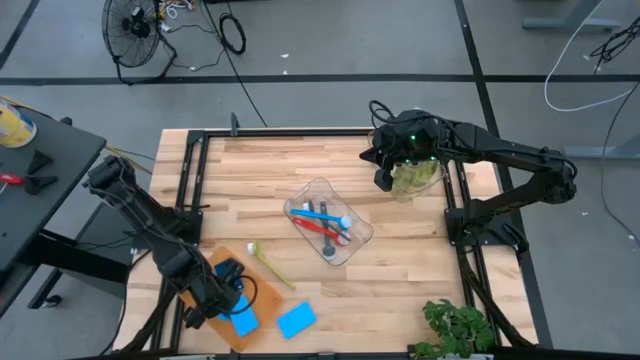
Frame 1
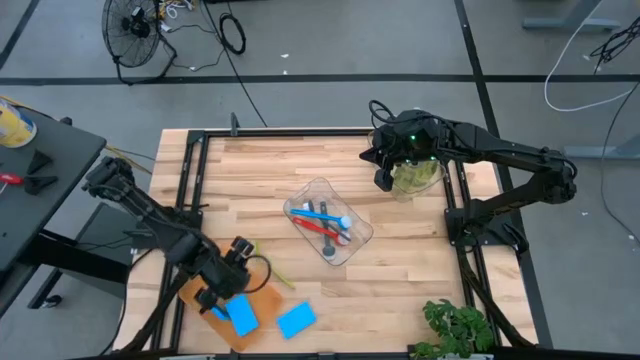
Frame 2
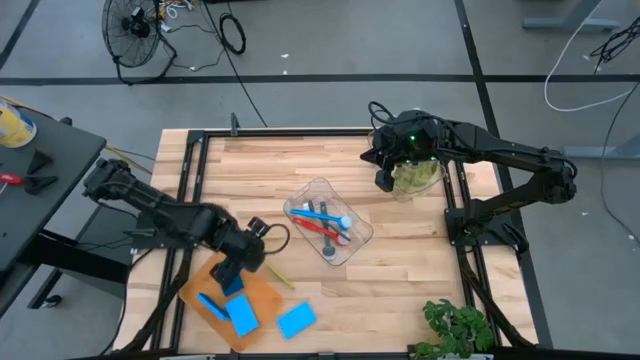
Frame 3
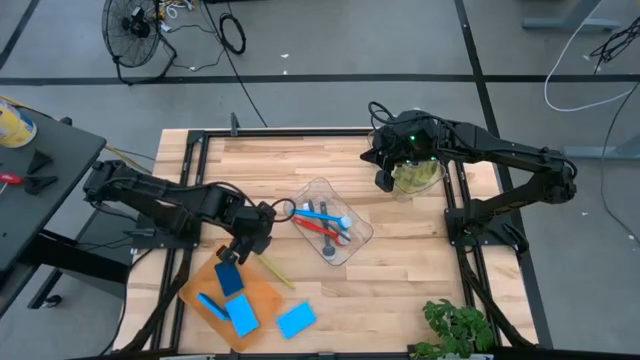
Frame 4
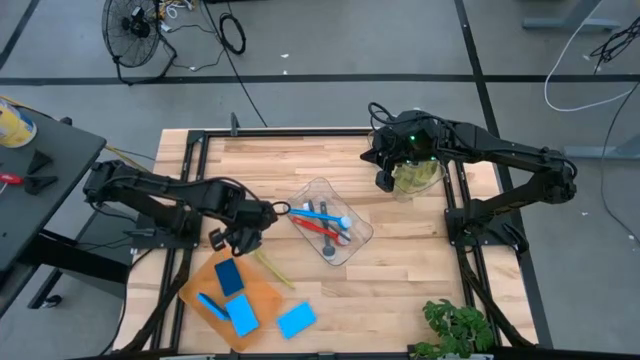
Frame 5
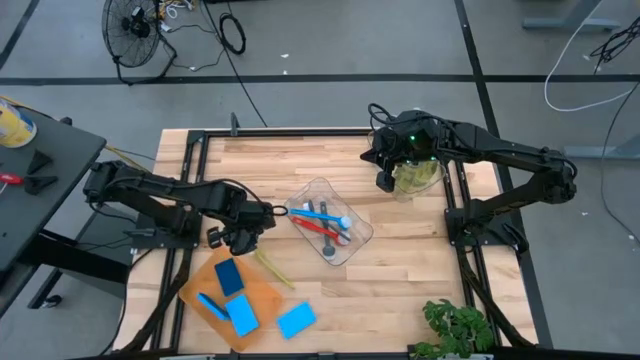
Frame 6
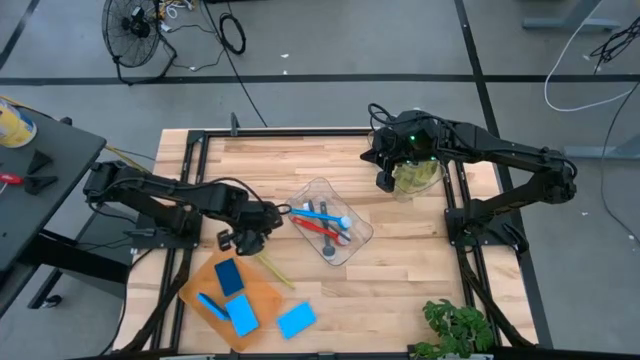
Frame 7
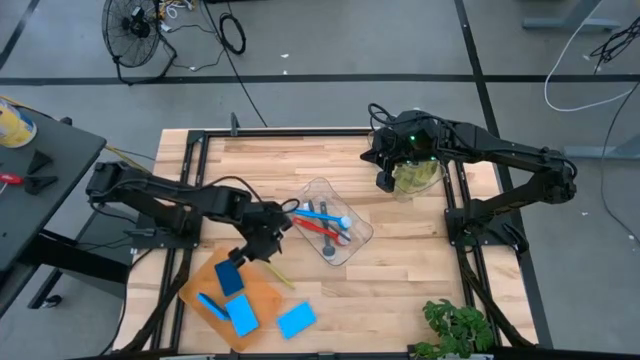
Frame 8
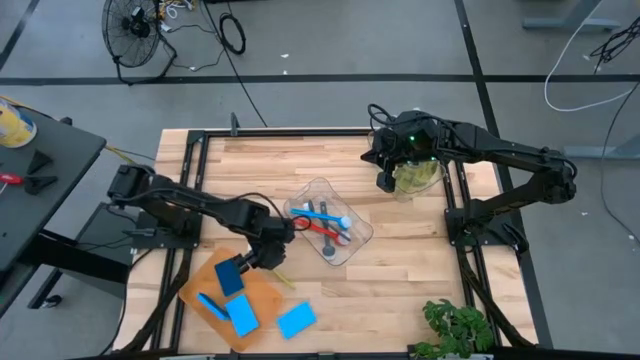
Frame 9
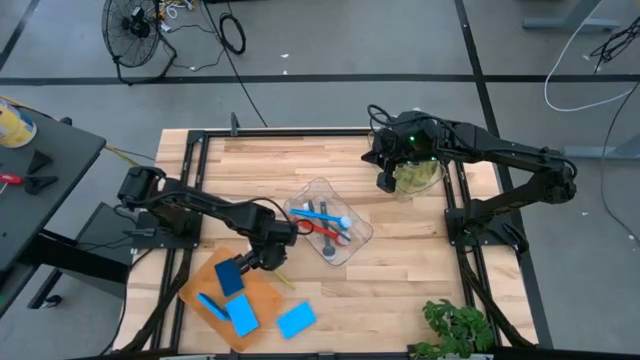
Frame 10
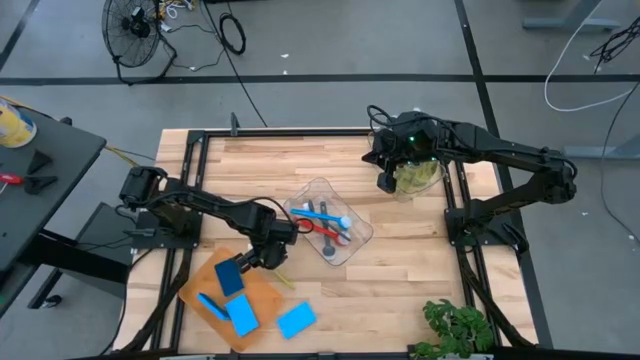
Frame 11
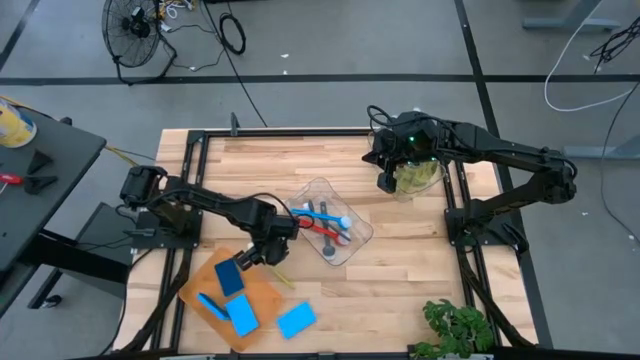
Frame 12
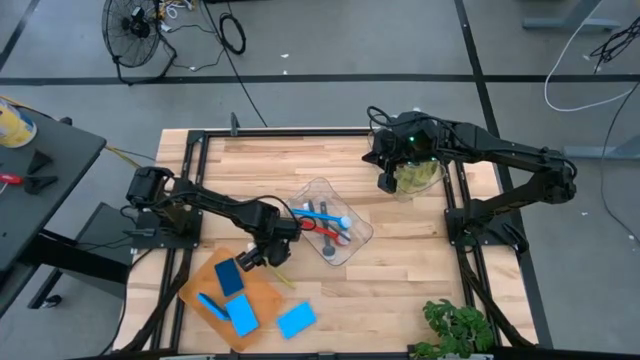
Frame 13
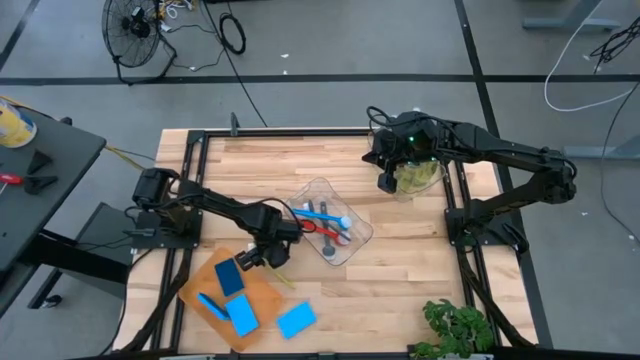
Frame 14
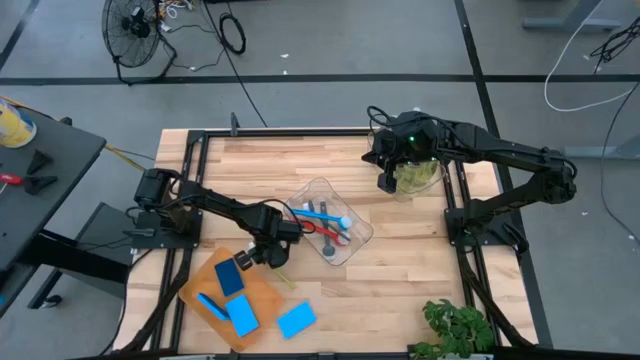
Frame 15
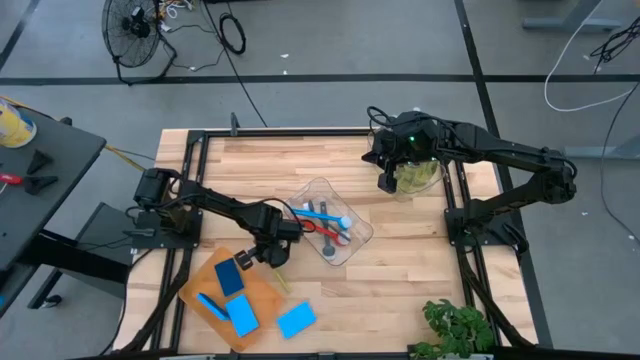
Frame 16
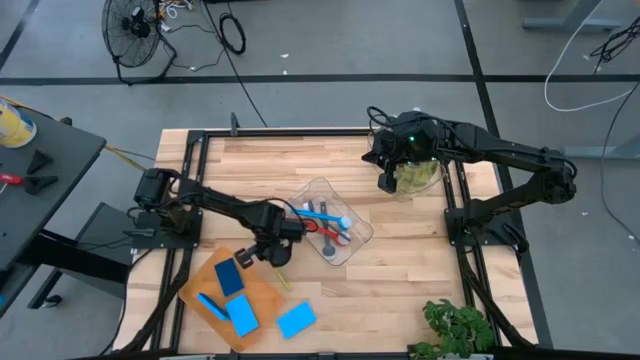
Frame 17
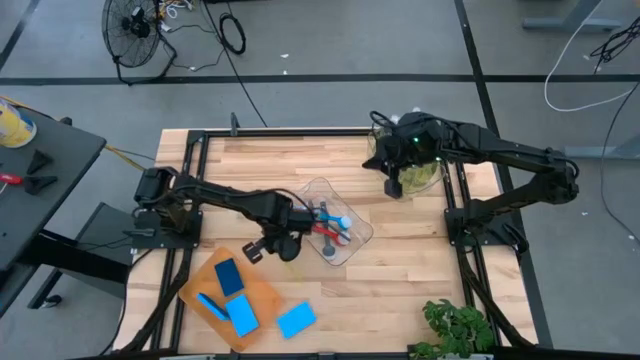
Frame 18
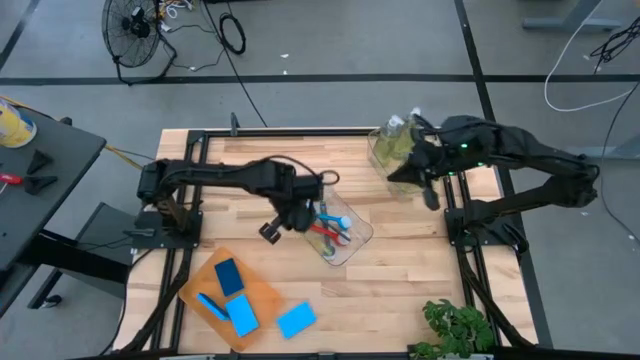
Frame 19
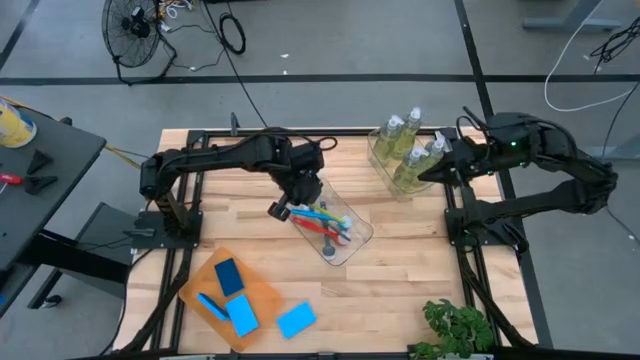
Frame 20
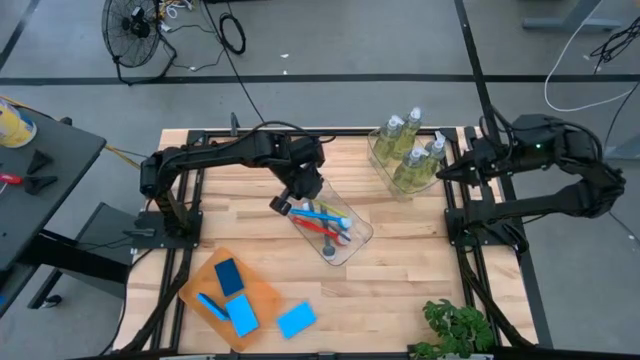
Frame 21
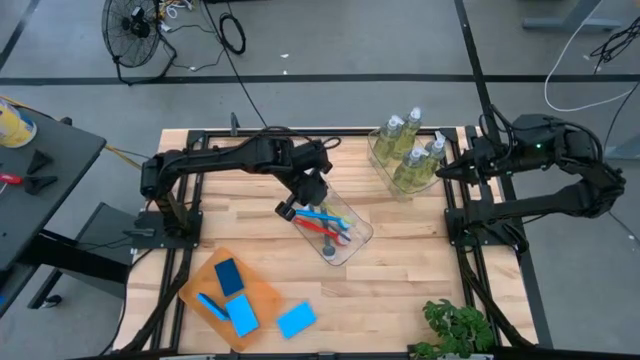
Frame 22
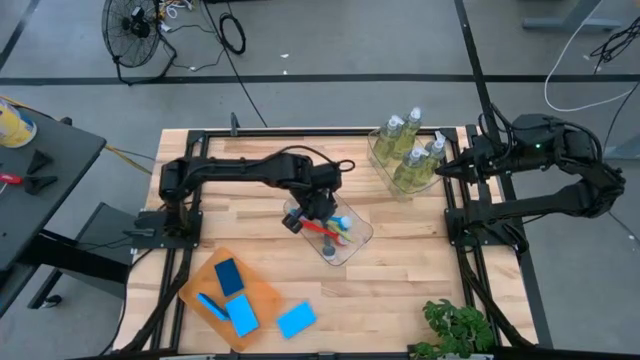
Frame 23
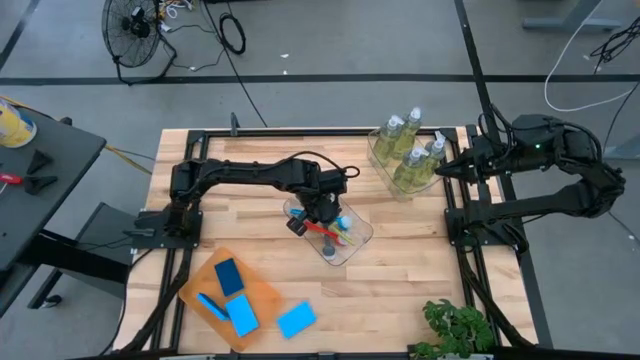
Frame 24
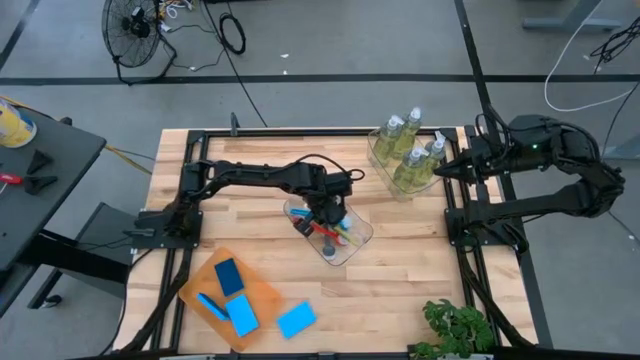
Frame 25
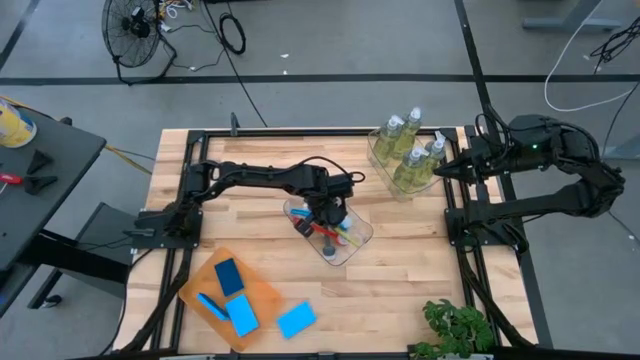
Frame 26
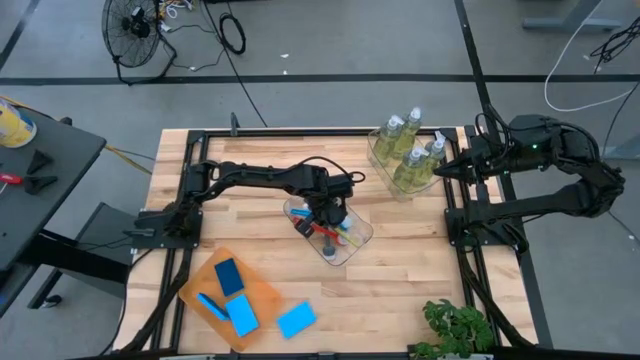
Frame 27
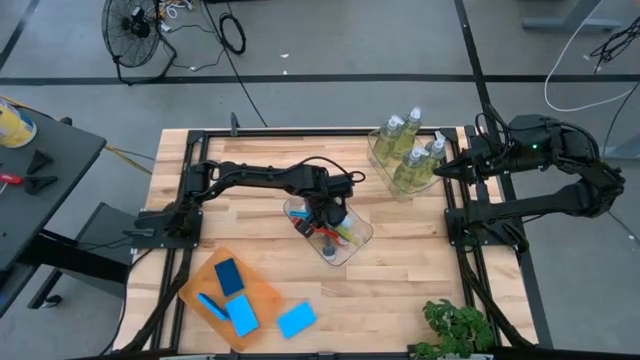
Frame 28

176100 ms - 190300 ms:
Task: Pick & Place Kitchen Sink Supplies
Put the green dish brush into the bottom transparent bin

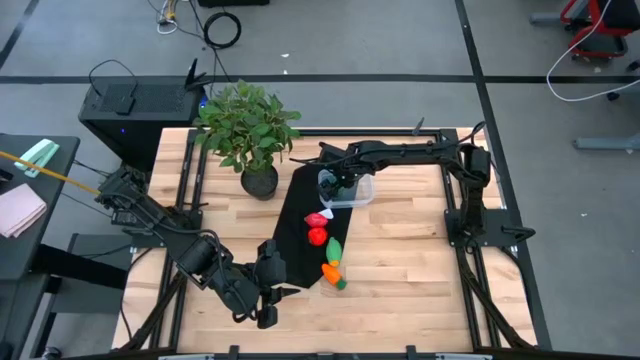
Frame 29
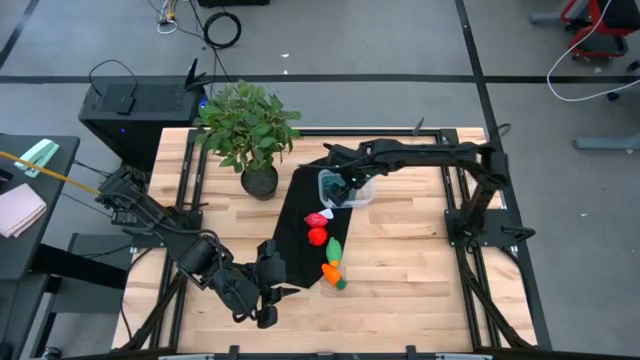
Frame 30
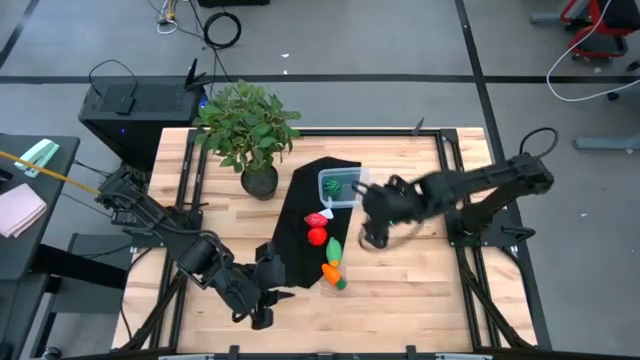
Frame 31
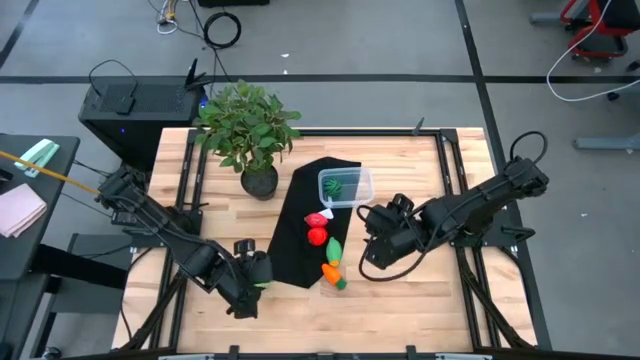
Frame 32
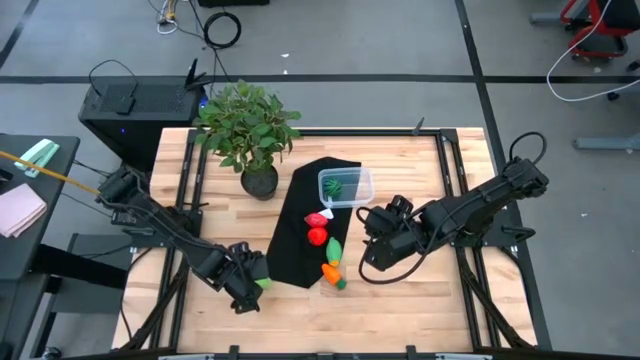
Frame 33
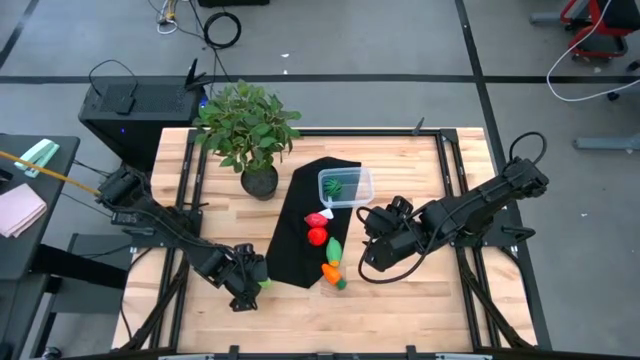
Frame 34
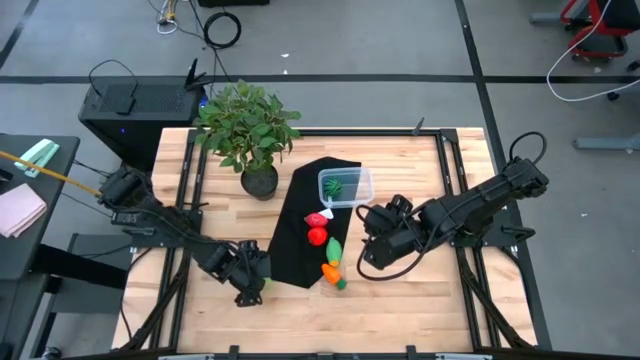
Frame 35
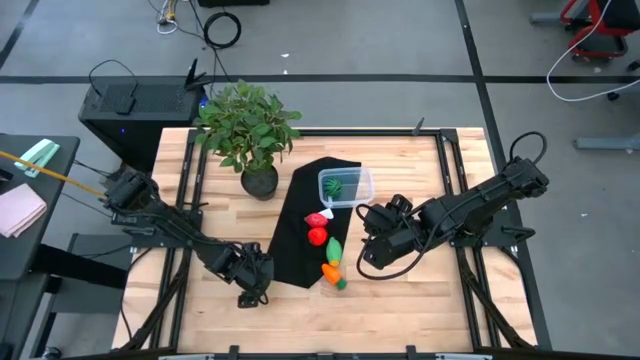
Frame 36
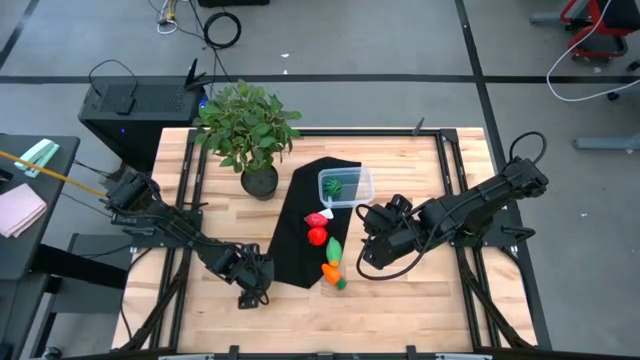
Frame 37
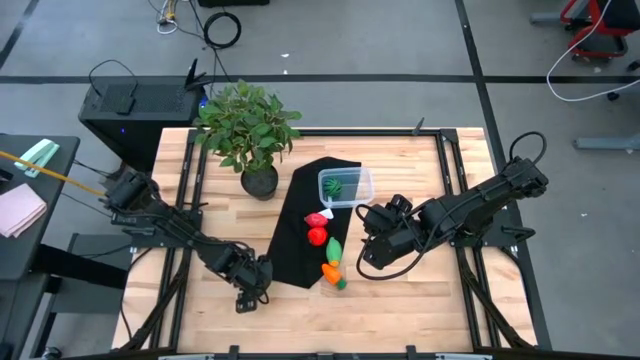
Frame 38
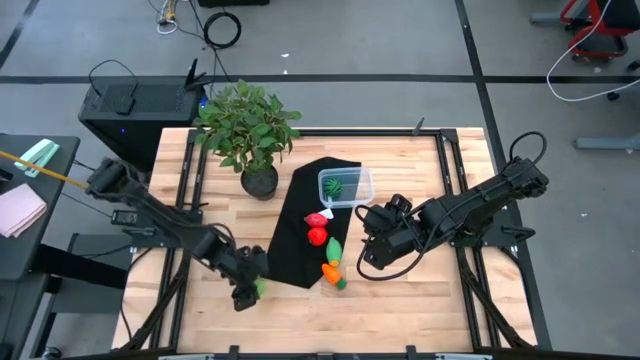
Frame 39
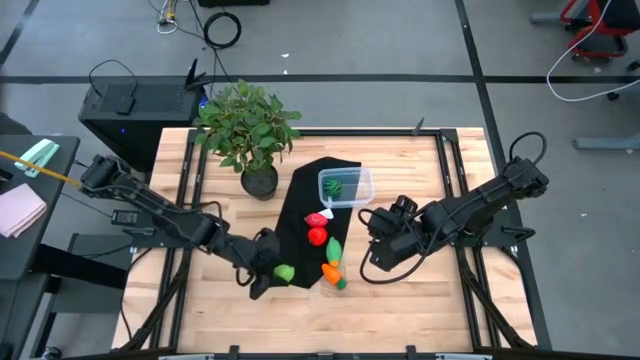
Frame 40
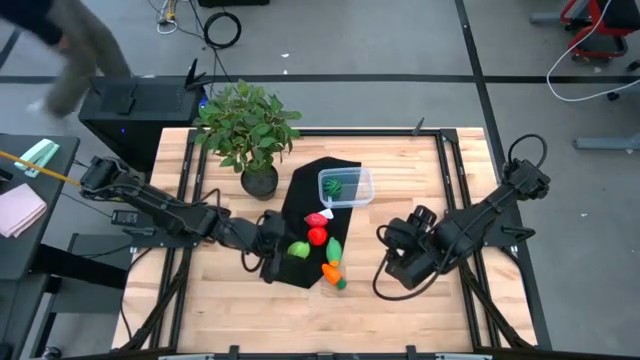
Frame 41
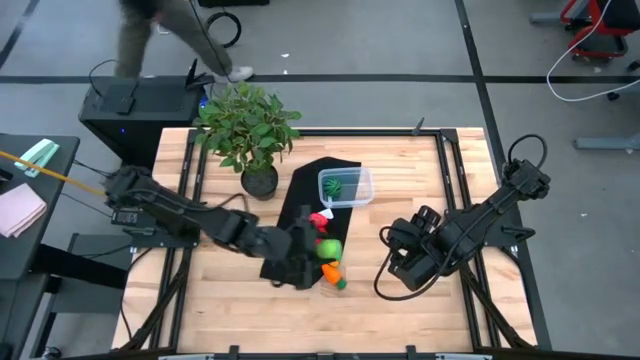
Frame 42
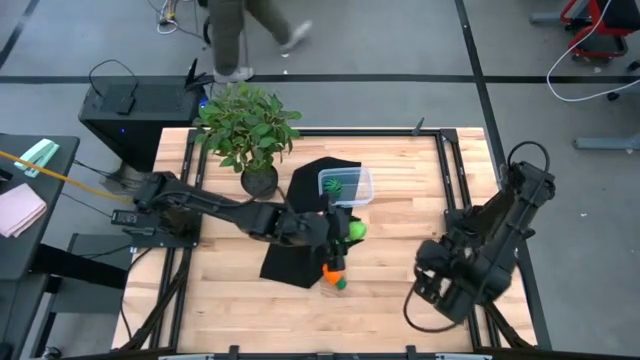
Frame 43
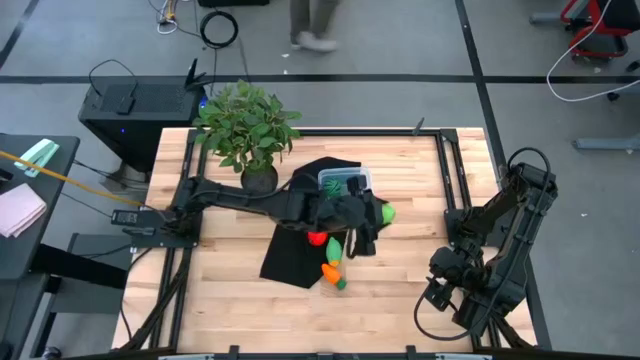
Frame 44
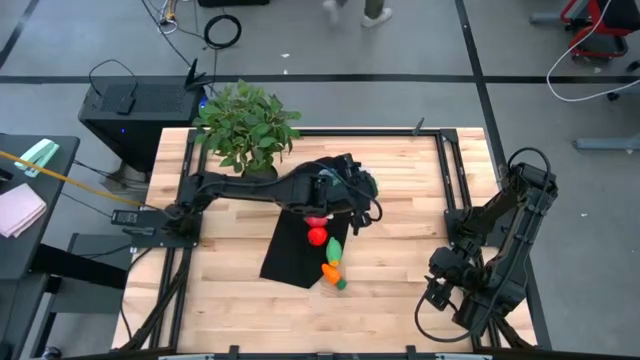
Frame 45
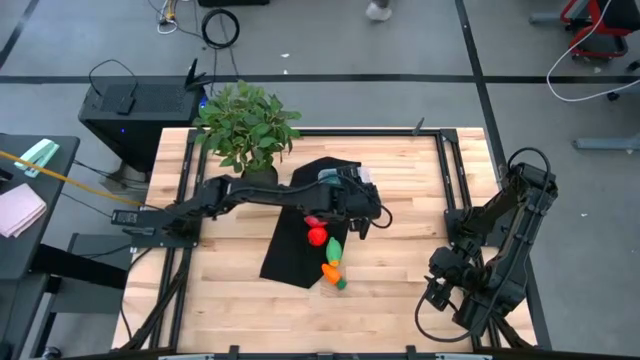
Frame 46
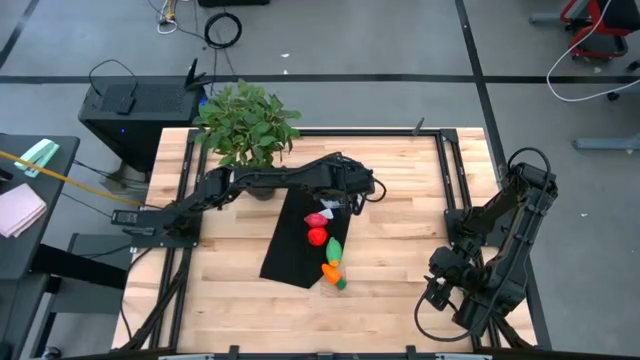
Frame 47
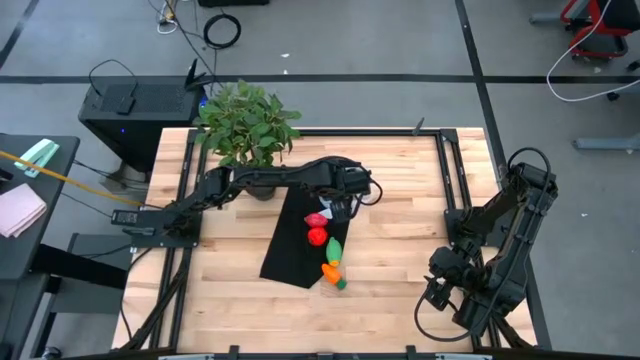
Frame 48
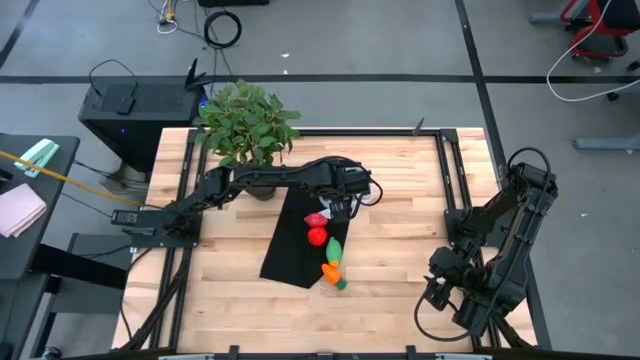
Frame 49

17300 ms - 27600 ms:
Task: Pick and placing Produce into tupperware
Put the cabbage into the transparent bin
